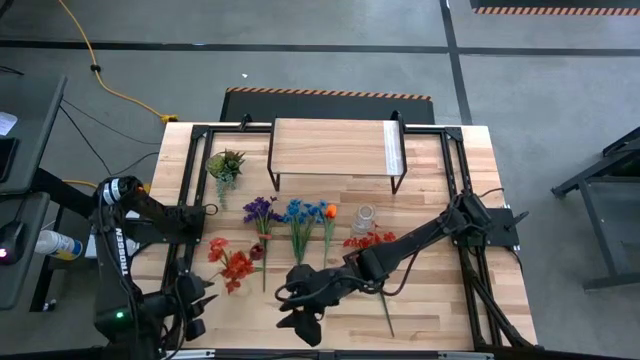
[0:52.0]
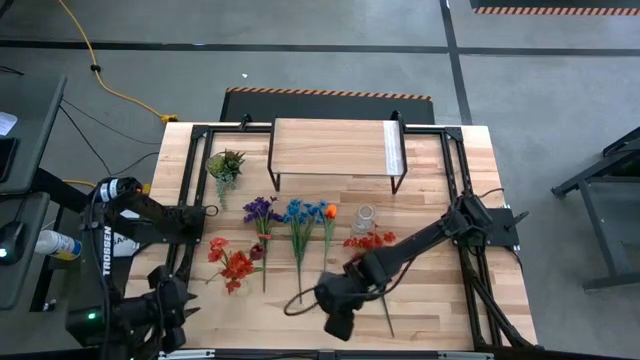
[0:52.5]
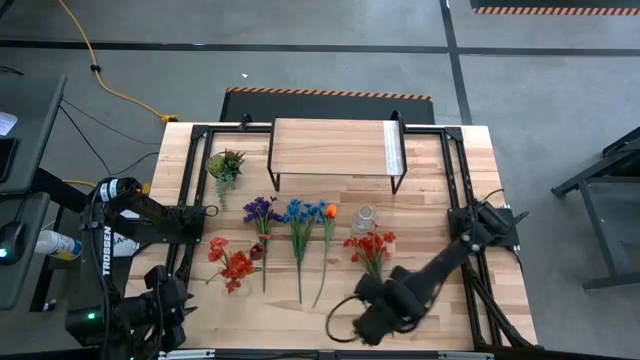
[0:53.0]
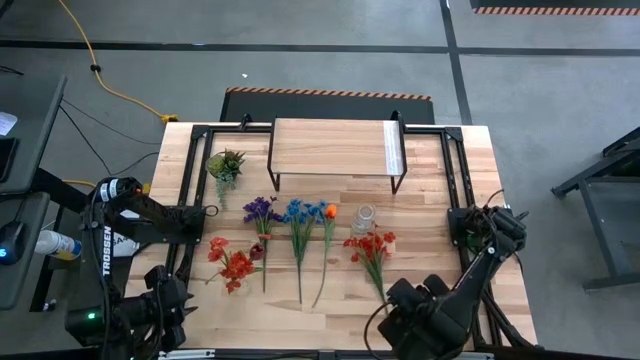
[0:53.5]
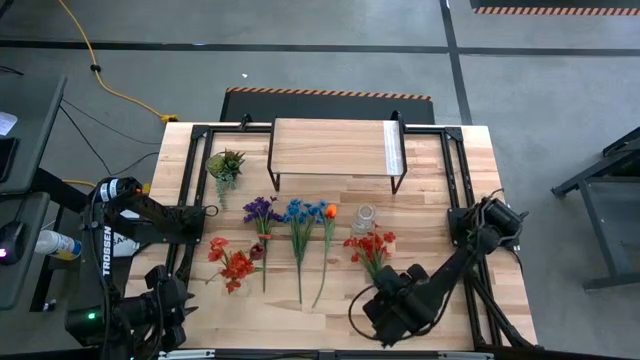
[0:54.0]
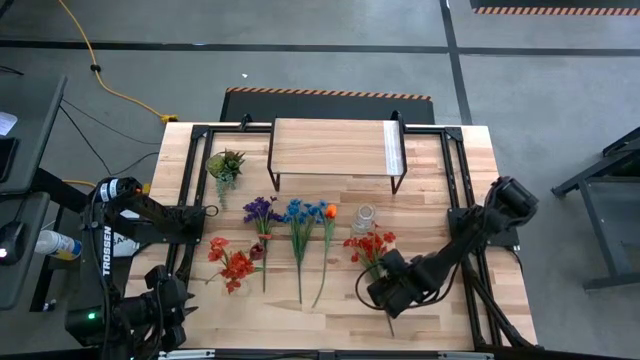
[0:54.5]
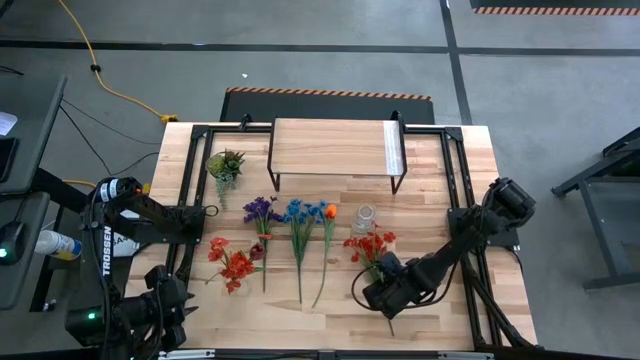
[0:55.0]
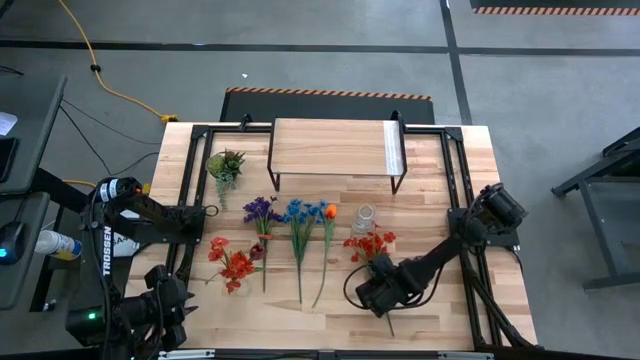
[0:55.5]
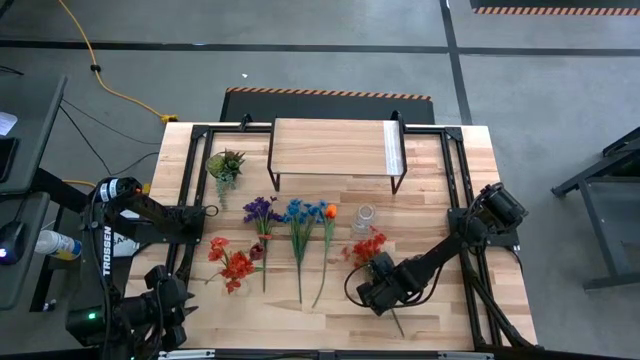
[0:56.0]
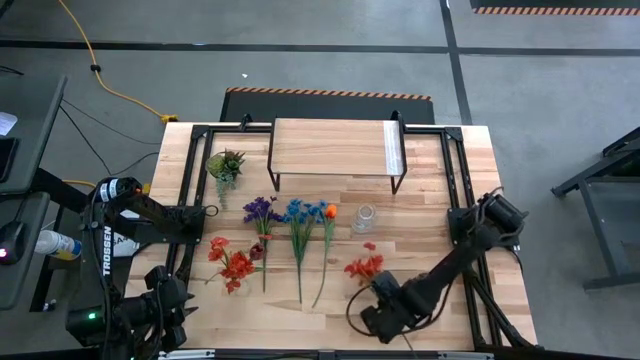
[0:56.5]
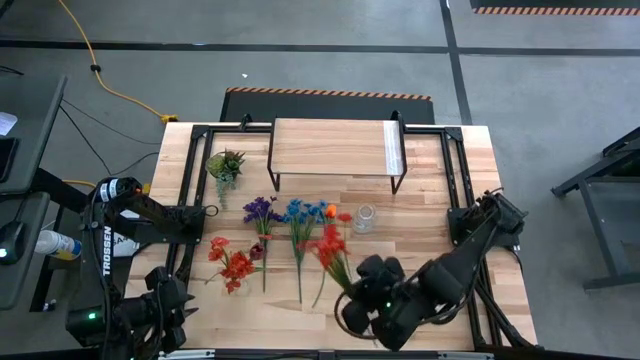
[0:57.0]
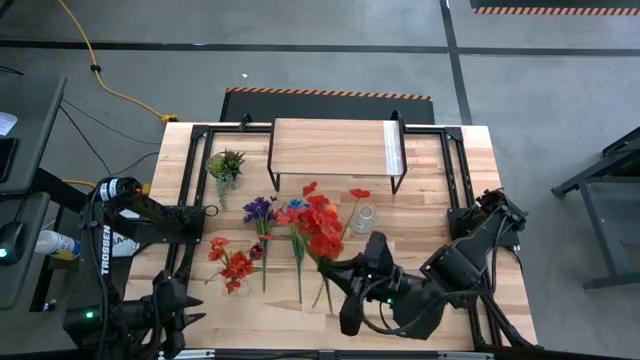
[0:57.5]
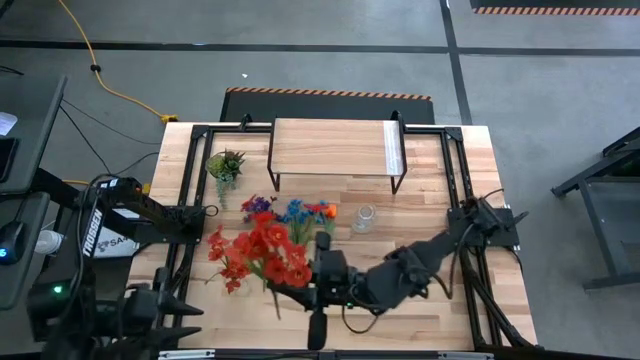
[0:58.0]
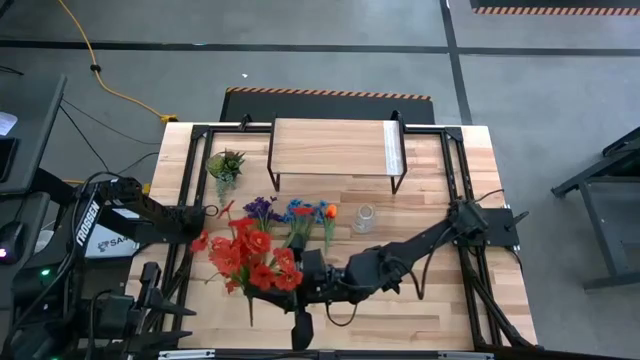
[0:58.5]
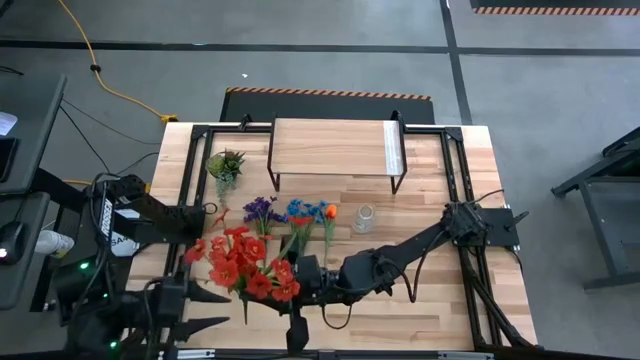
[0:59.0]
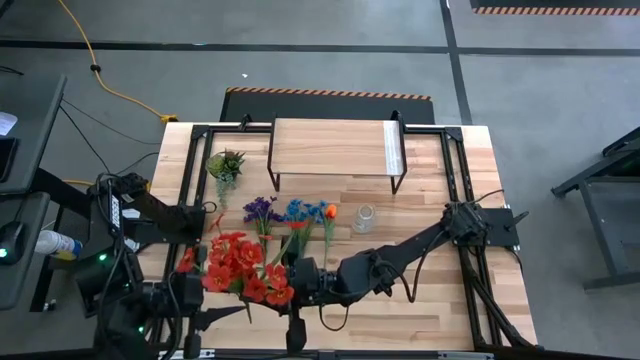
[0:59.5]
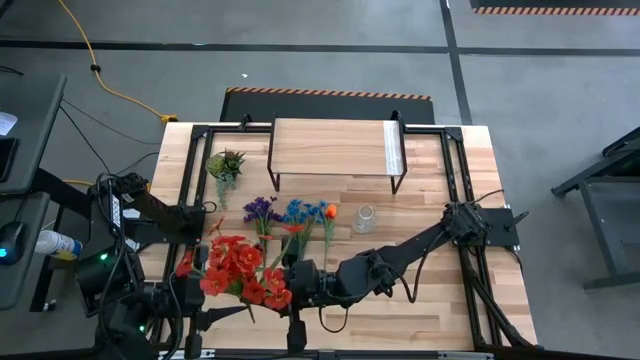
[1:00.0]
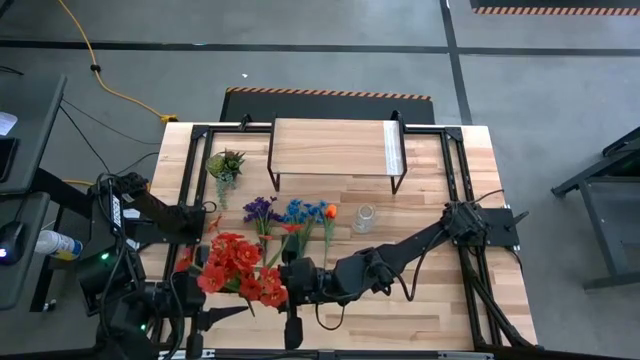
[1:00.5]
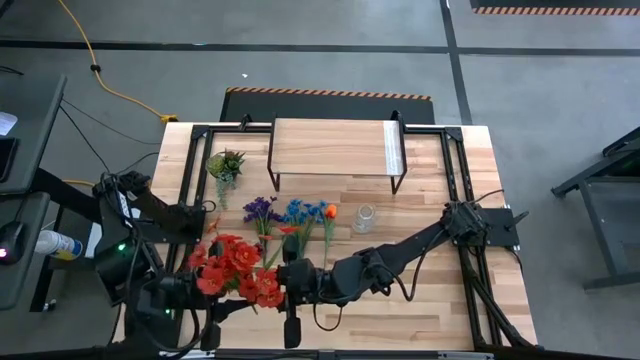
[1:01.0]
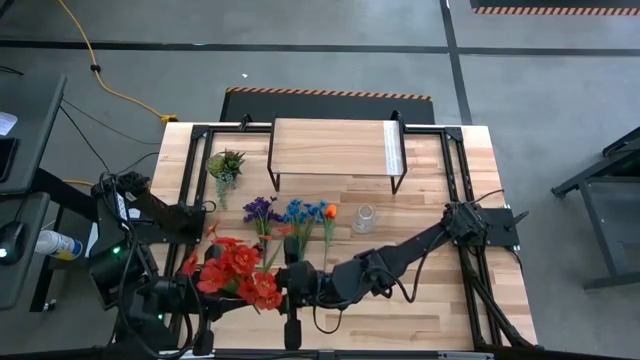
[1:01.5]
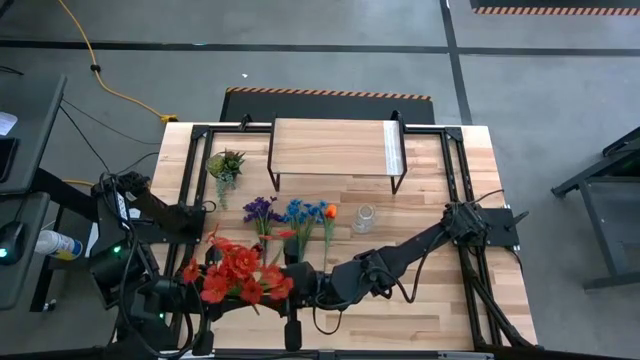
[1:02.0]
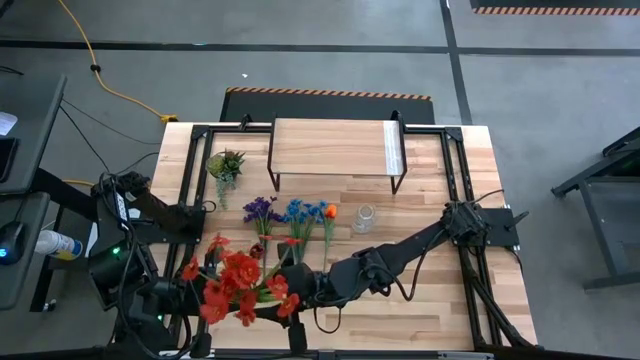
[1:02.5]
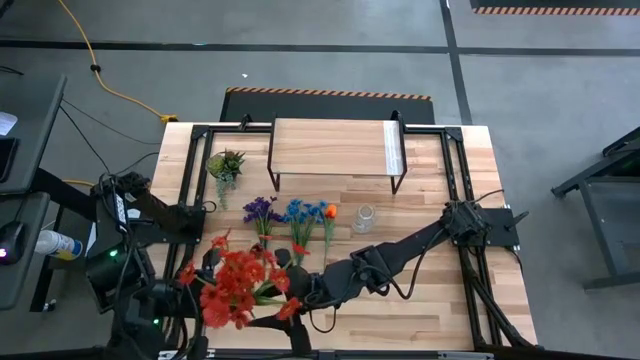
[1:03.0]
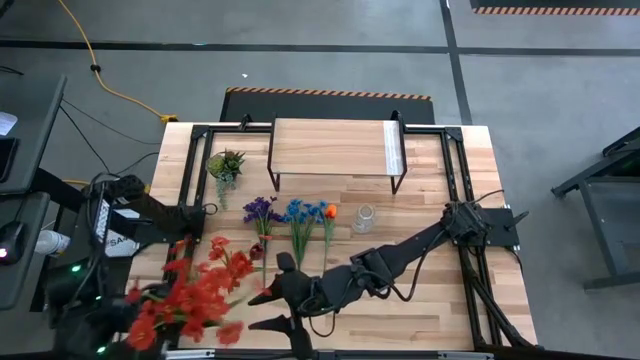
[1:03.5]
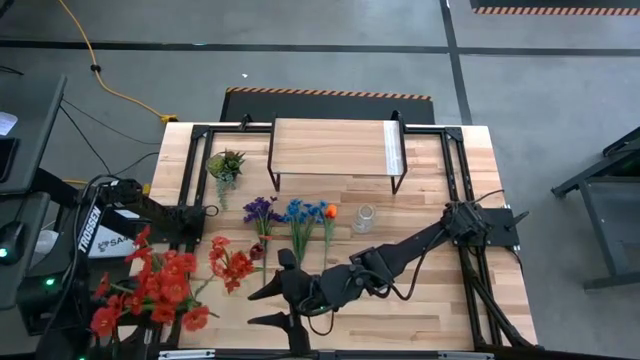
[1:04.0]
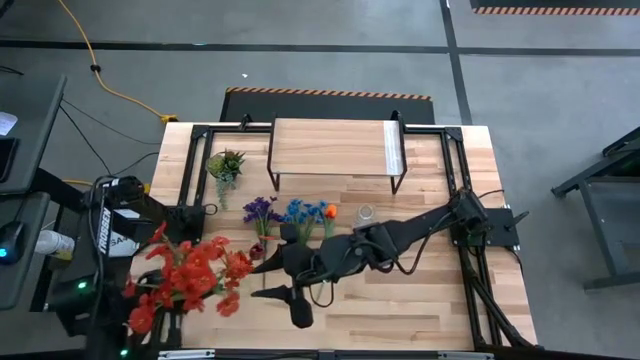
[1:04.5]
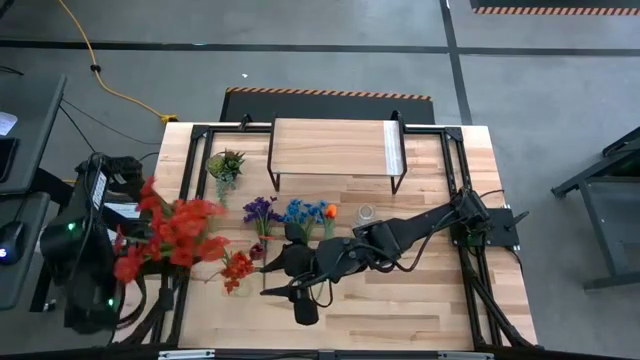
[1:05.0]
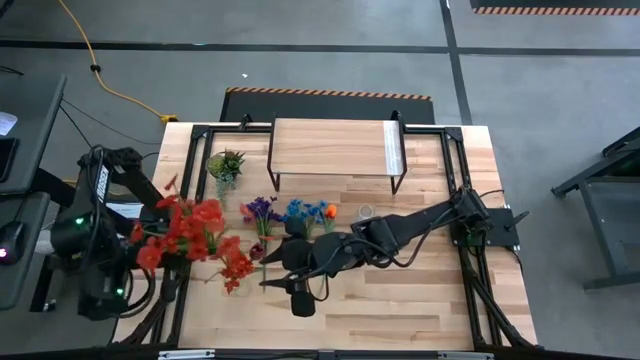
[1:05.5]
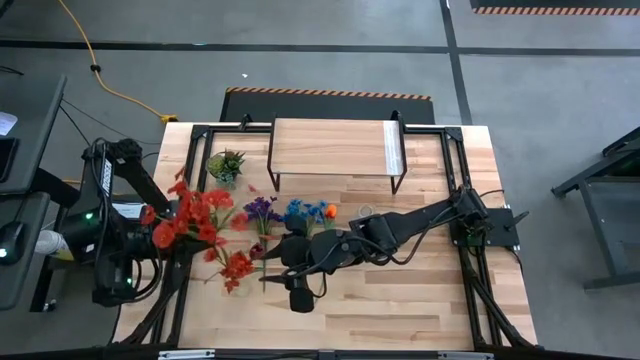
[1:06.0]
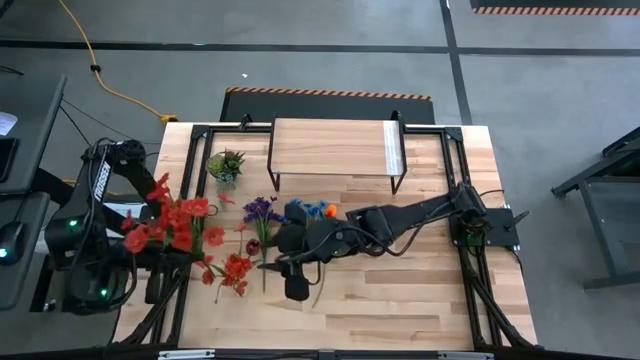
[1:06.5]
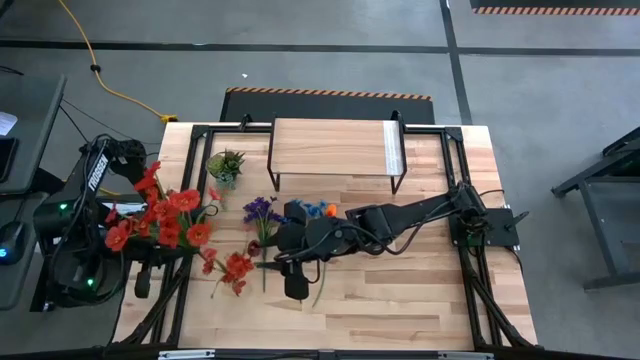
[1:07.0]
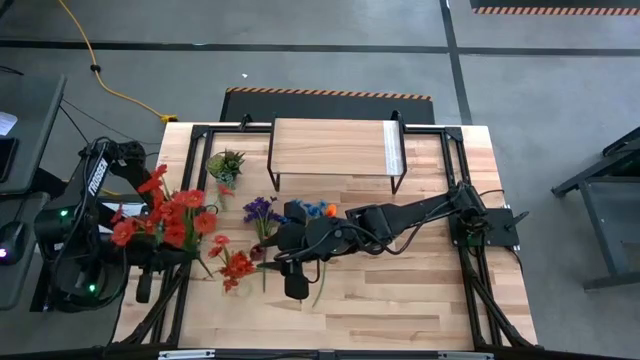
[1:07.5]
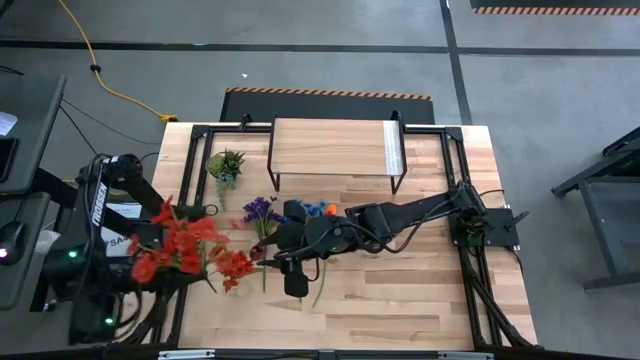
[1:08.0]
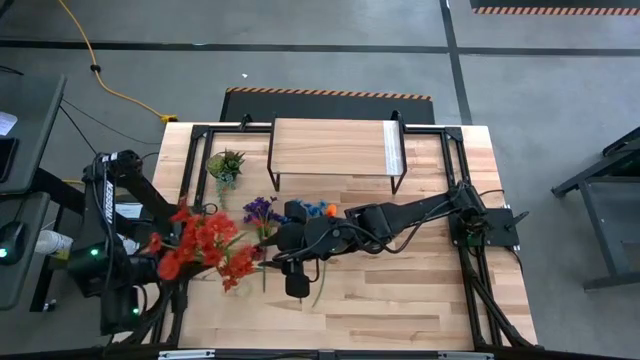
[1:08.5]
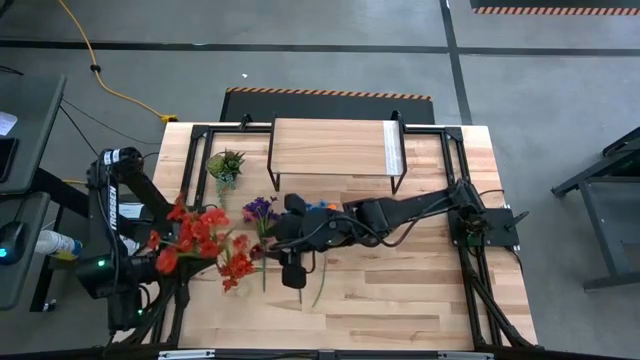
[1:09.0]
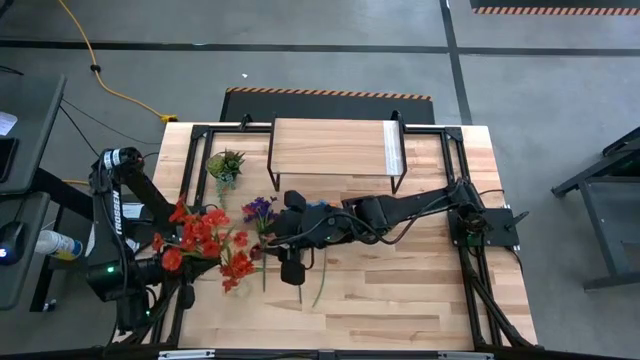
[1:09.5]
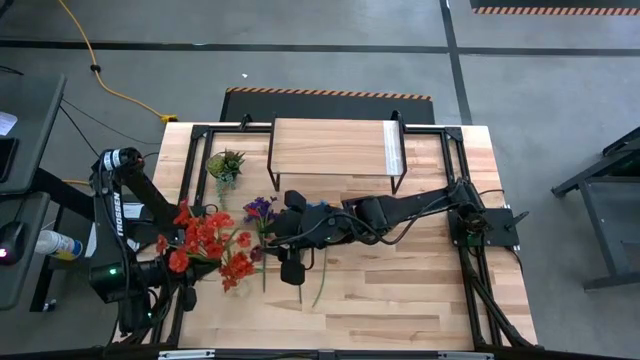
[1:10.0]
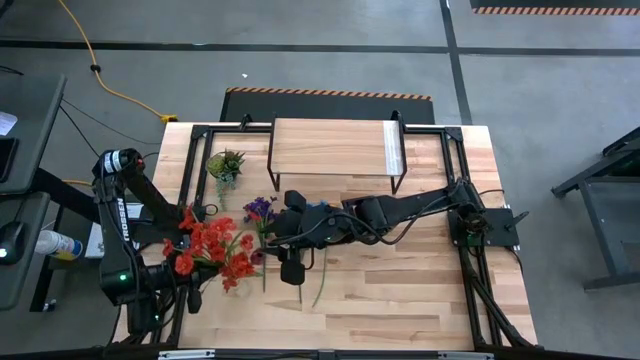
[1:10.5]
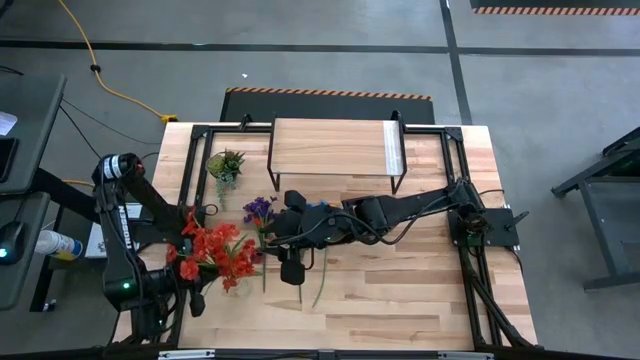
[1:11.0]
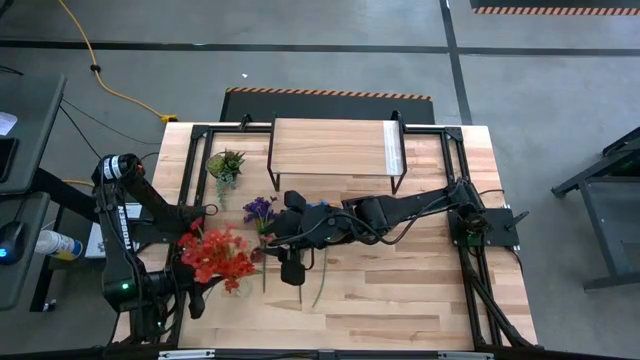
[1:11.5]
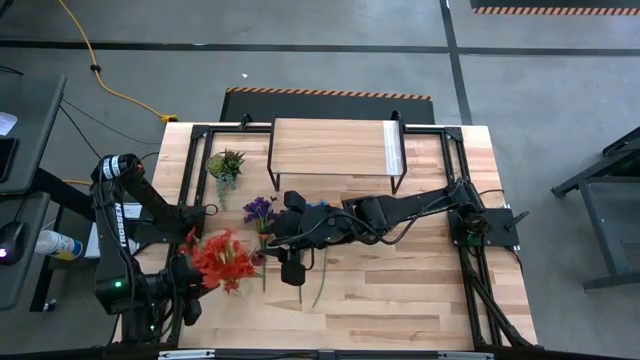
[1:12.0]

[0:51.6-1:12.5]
Task: Pick and place flowers into a vace then onto a shelf
Put the orange flowers into the bottom transparent vase

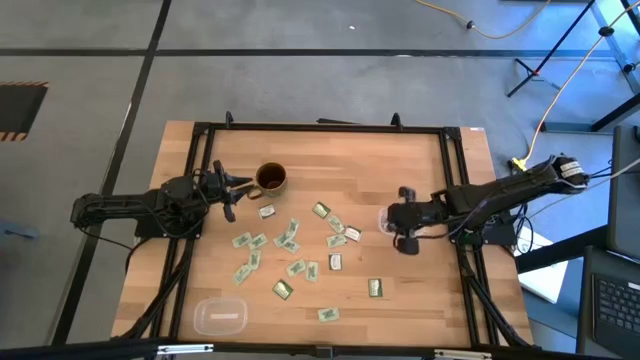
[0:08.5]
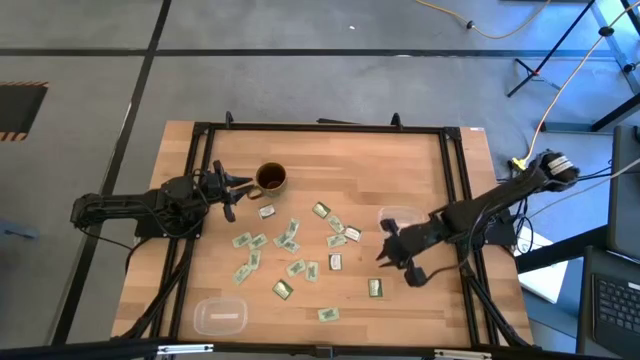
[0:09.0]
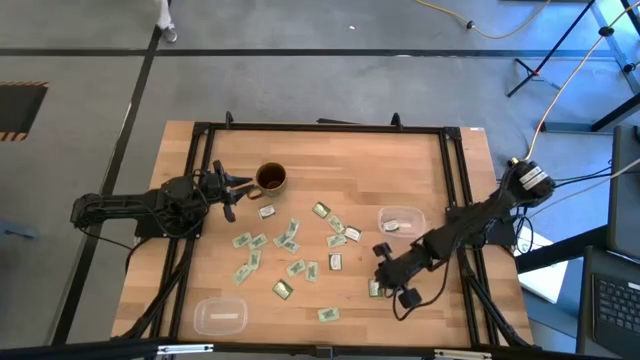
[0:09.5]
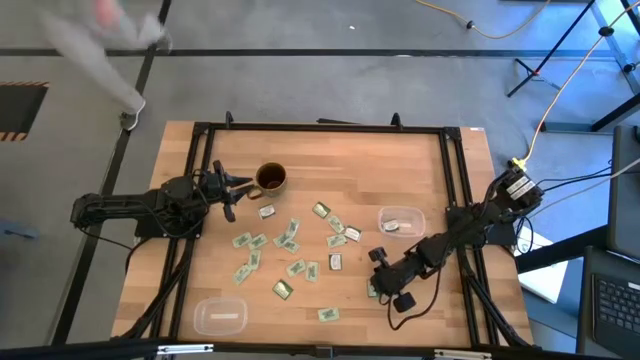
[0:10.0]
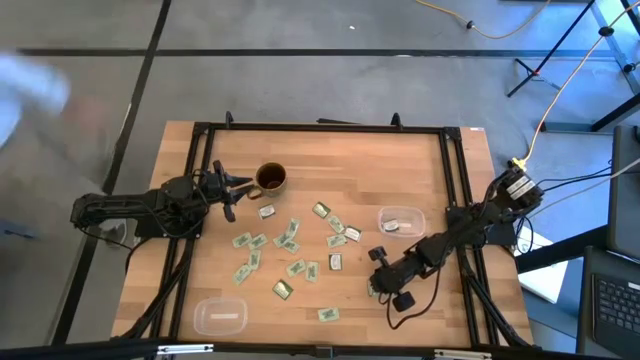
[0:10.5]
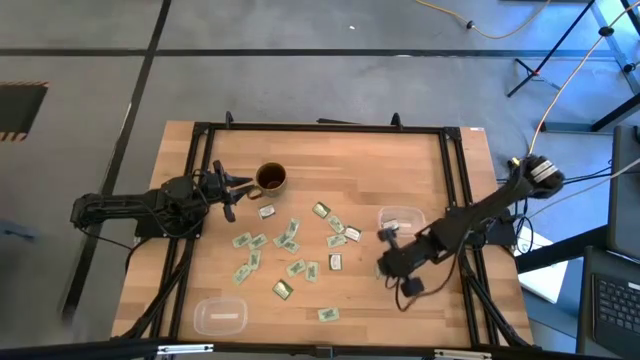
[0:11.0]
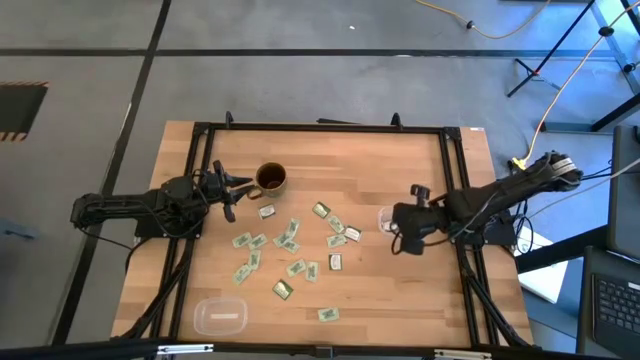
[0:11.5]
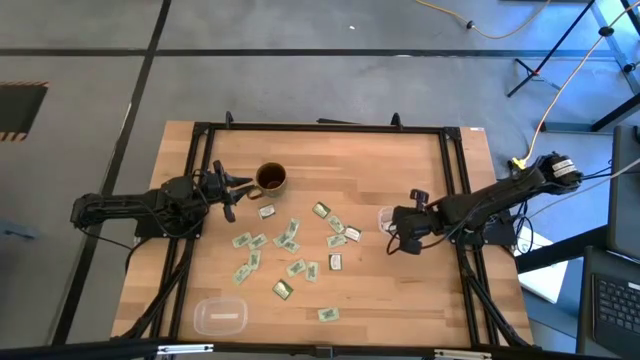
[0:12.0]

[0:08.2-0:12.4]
Task: Pick and place Stevia / Truvia into bins
Put the truvia packet into the top transparent container
